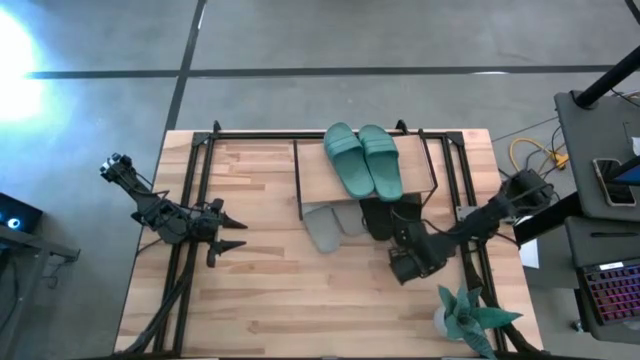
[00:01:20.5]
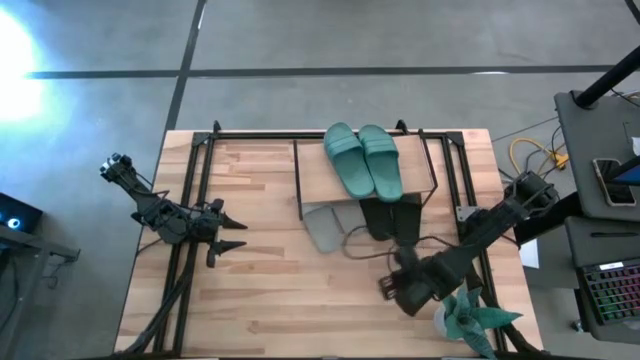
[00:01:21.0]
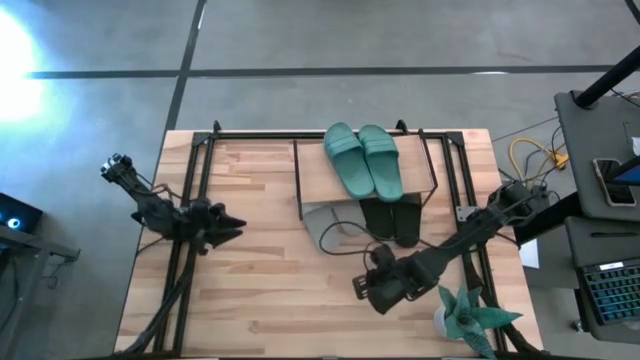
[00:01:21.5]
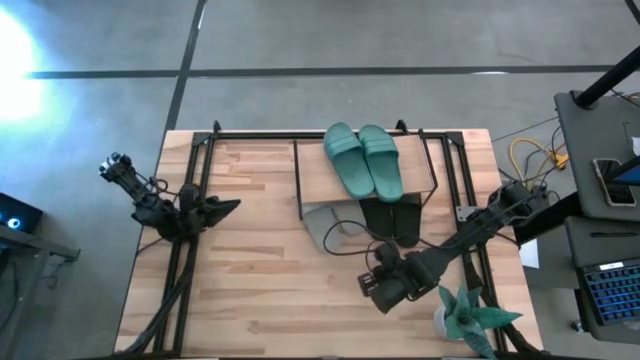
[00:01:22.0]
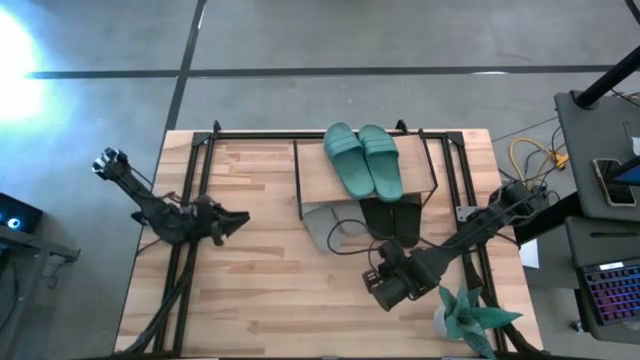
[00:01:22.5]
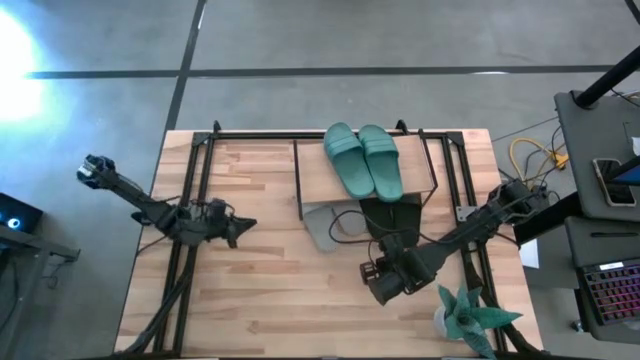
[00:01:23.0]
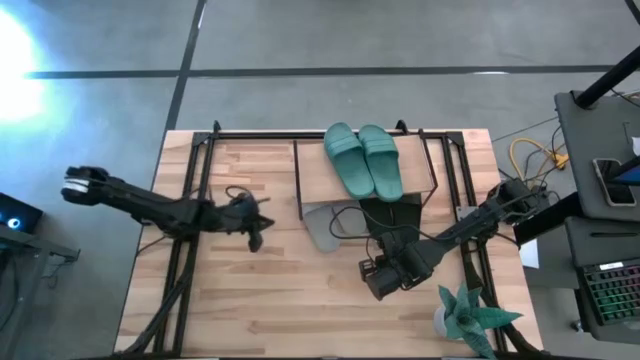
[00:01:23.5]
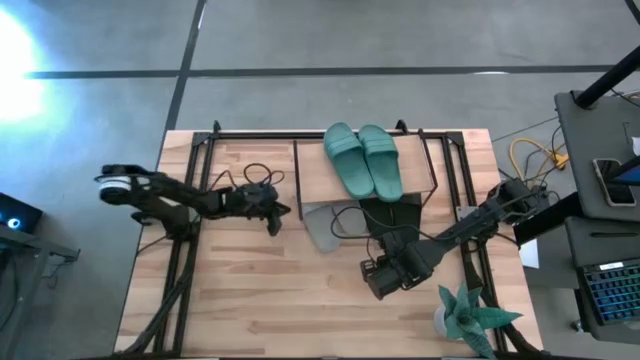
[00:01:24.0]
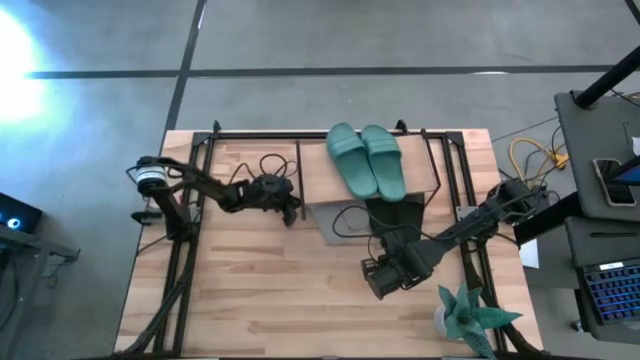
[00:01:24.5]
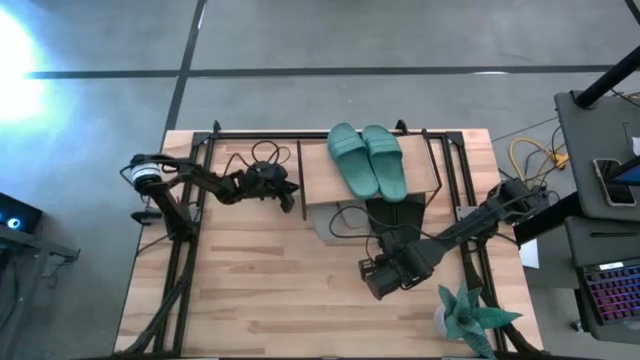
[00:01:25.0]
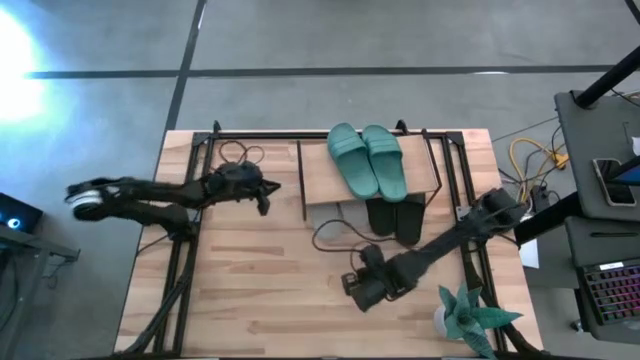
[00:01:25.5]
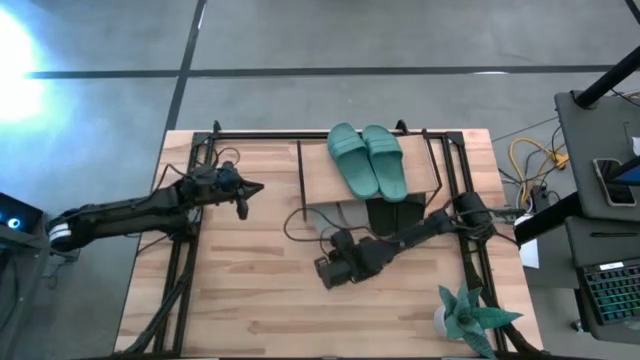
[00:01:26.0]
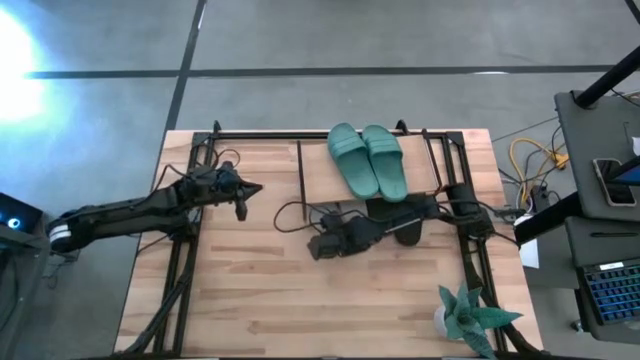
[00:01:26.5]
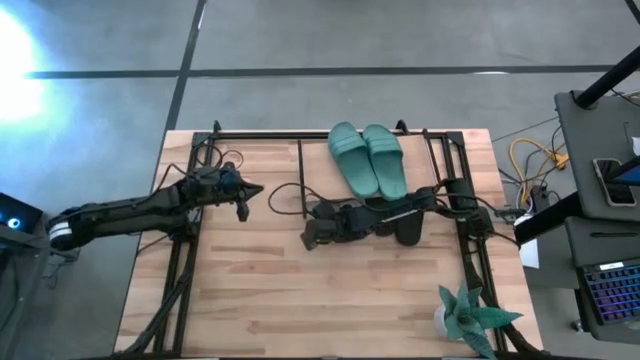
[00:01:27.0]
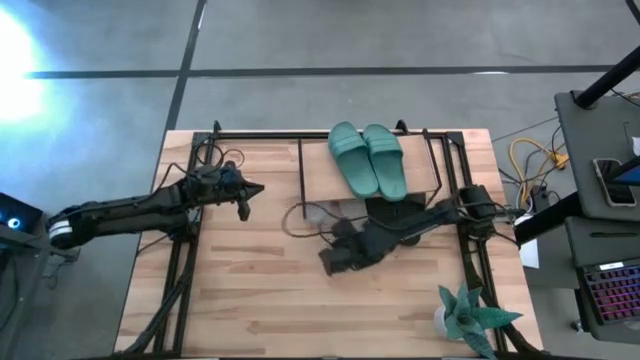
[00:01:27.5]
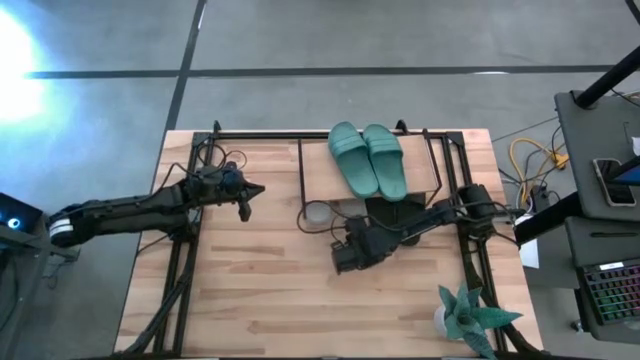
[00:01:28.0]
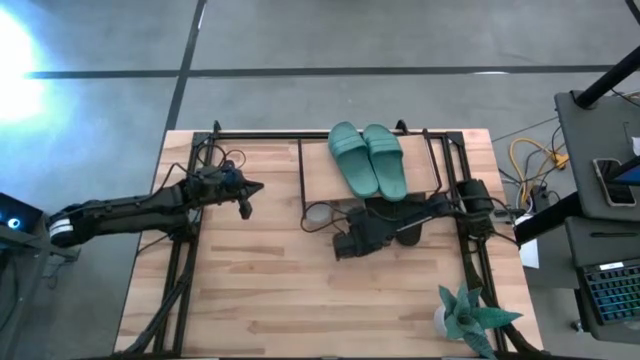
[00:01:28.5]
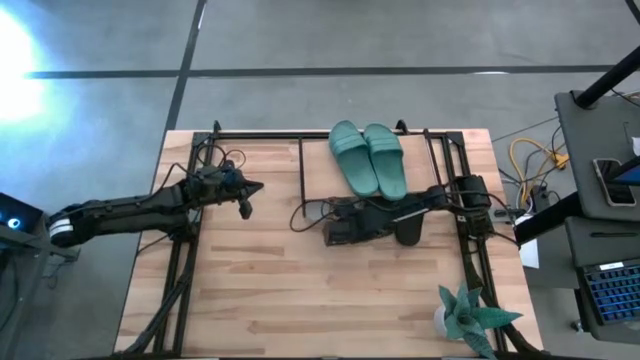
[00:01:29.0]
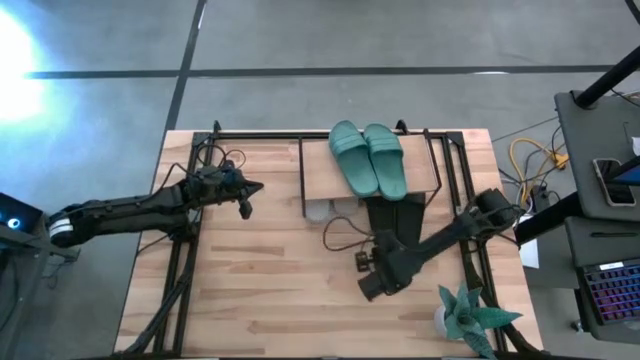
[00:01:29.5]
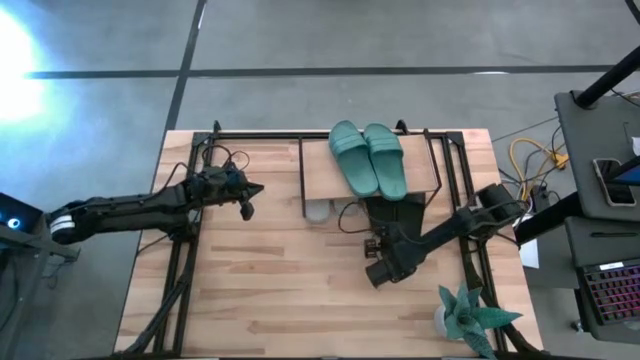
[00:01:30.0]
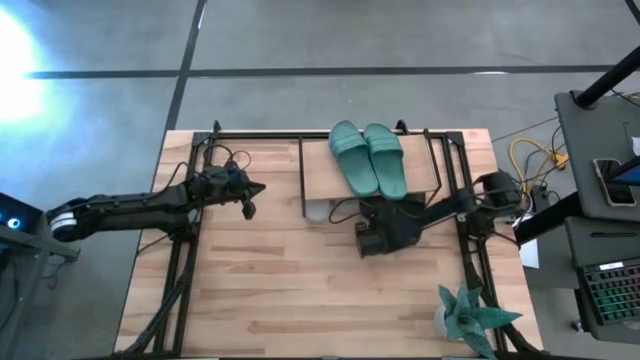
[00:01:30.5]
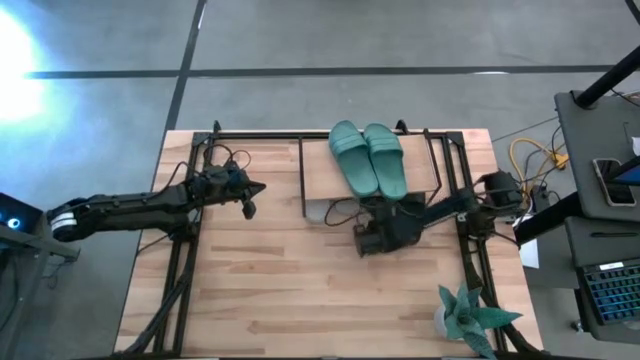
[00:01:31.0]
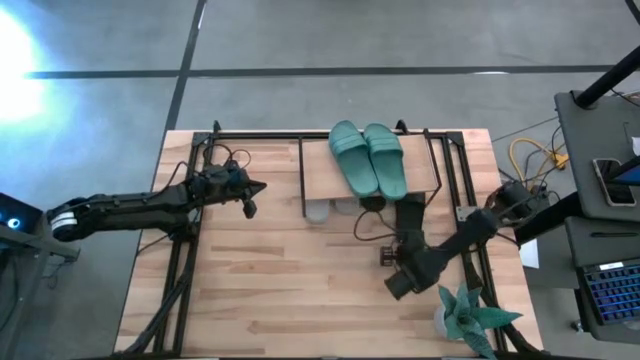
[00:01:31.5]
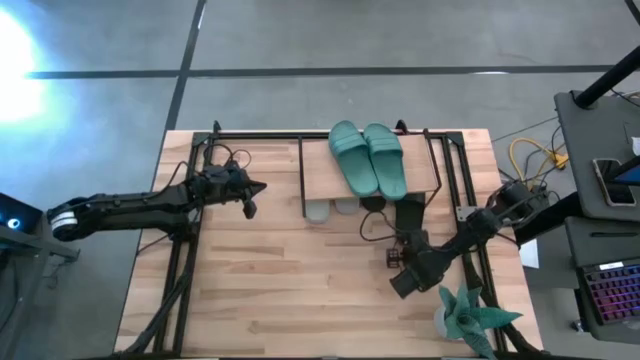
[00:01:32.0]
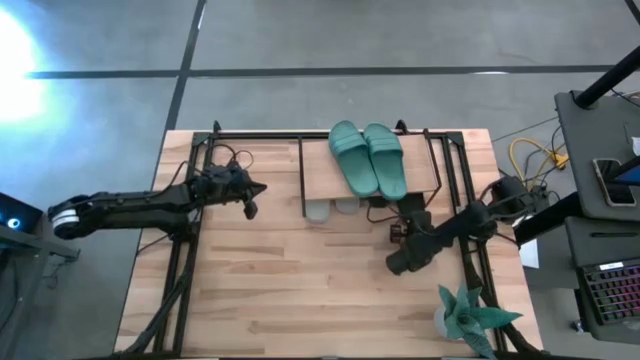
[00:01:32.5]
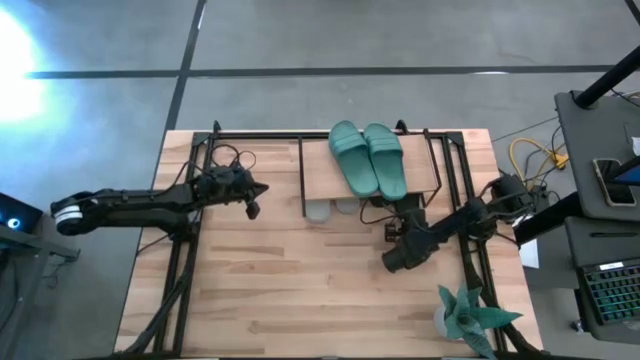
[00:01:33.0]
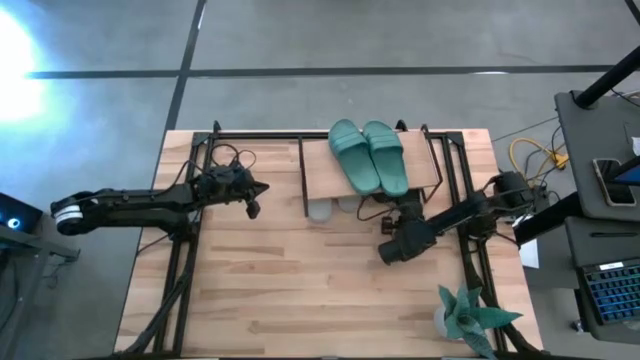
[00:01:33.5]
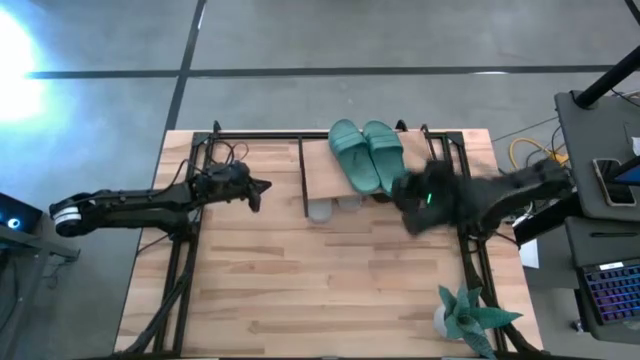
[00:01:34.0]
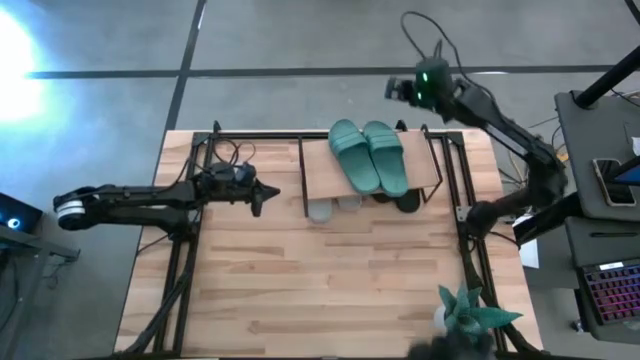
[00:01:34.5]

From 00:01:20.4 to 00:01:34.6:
Task: Pick and place slides into the shelf
Adjust the slides under the shelf

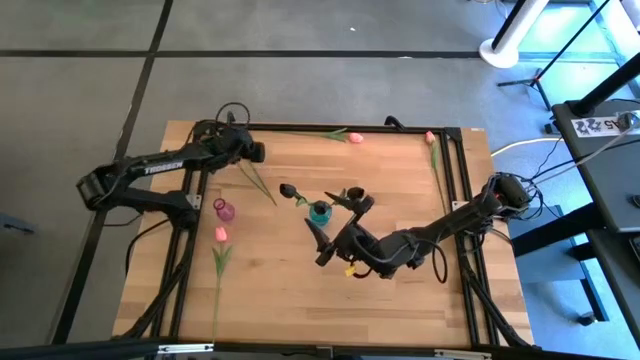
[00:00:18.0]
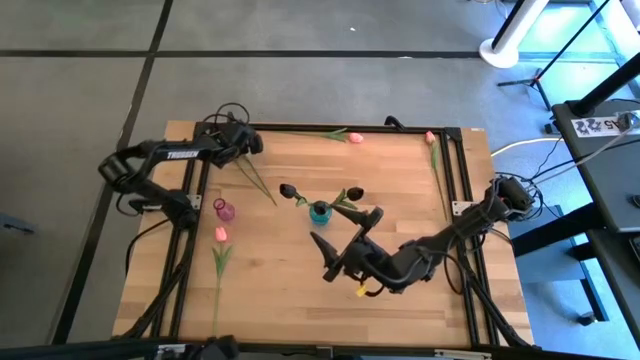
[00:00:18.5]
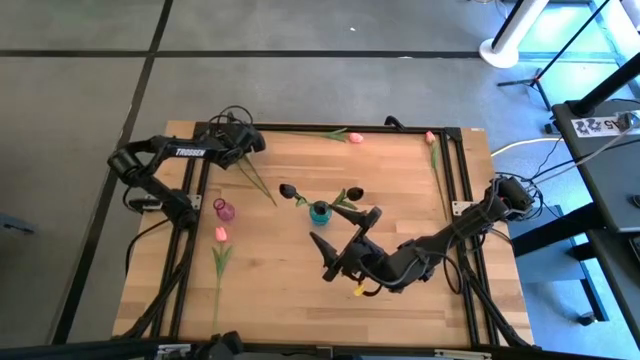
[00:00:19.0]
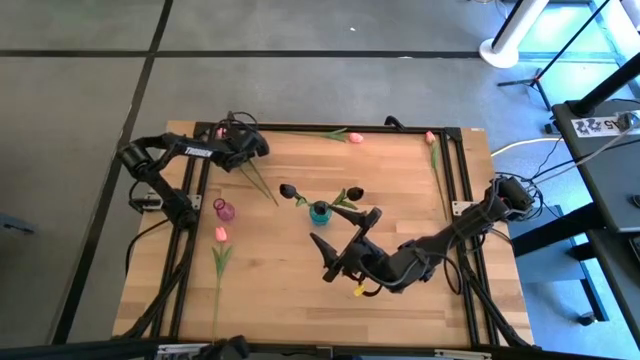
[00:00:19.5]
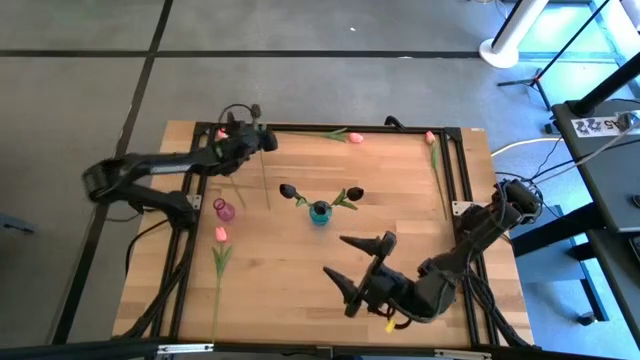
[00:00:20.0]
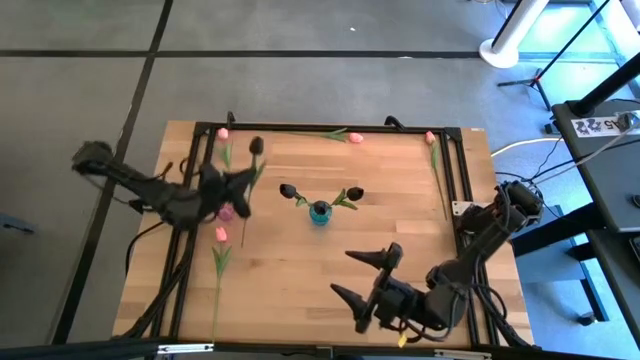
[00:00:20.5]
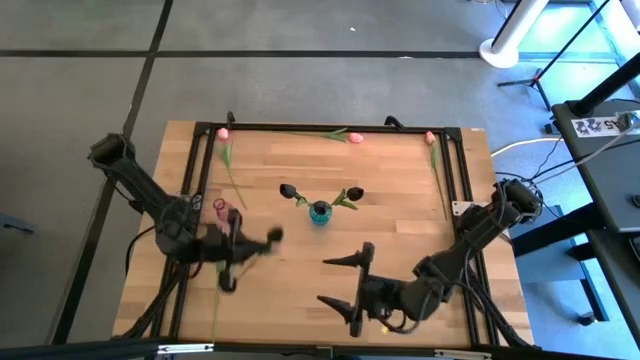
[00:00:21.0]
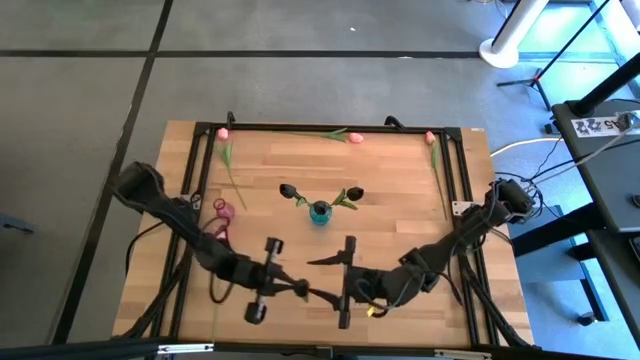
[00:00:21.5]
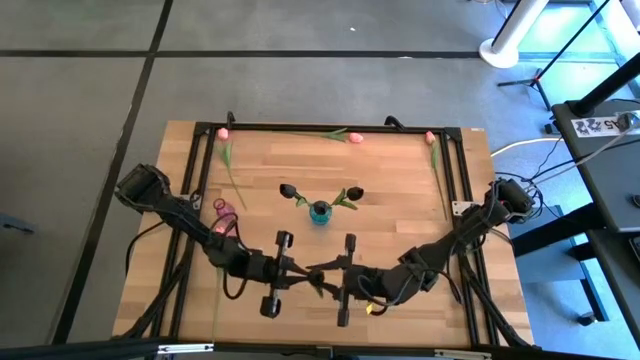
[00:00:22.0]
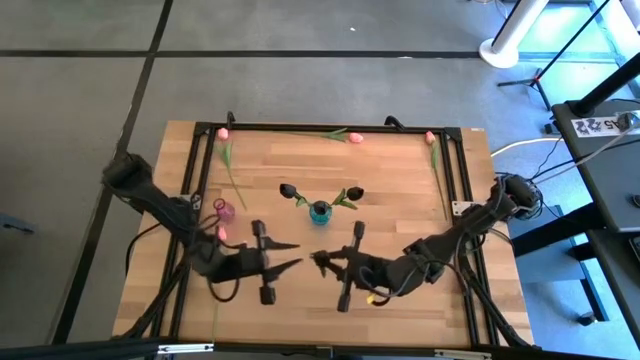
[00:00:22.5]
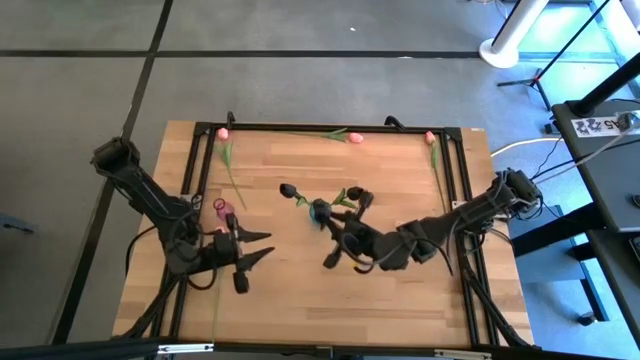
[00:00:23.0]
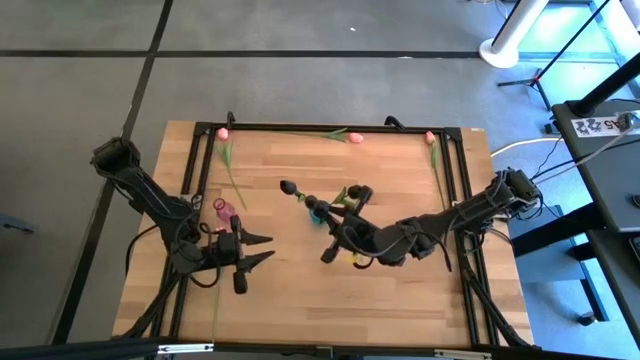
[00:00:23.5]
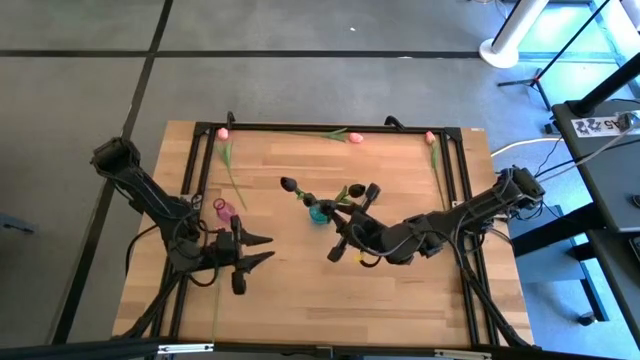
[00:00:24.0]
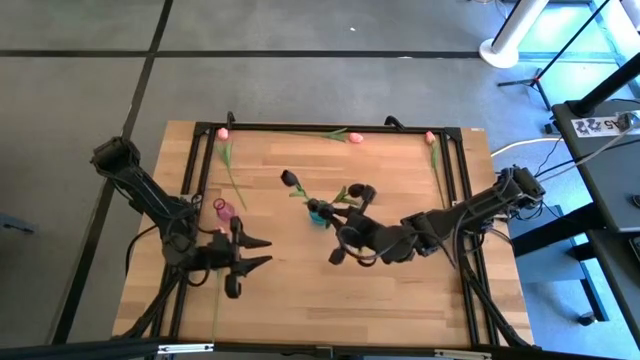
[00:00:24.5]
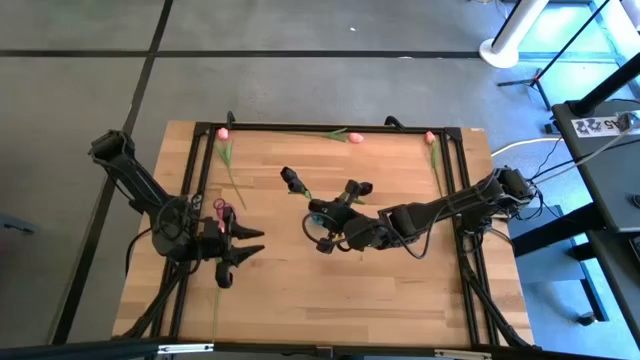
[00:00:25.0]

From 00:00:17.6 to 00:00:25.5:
Task: Sort flowers into vase by color
Put the black tulip into the blue vase
